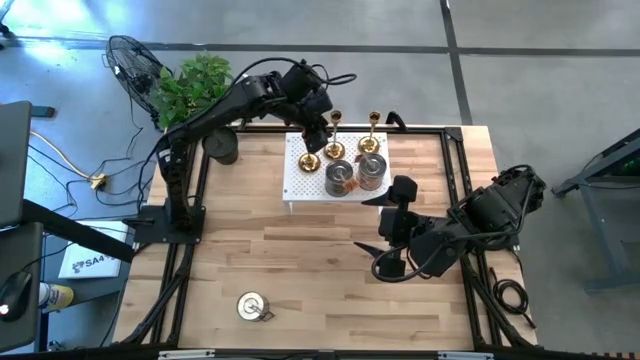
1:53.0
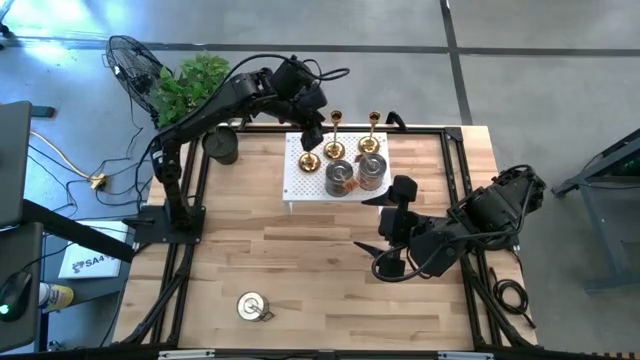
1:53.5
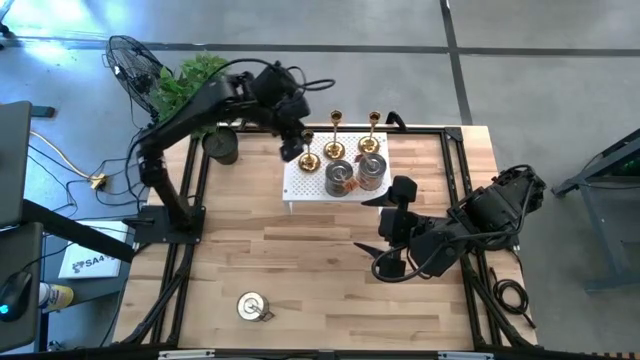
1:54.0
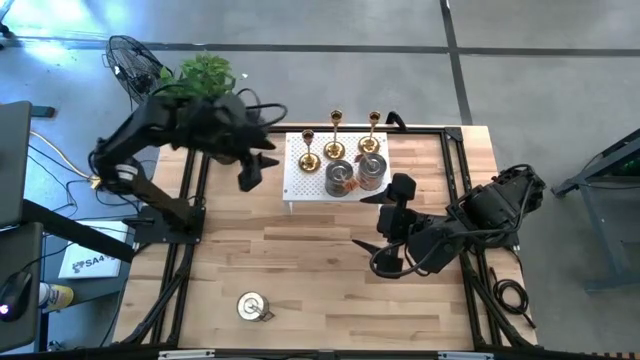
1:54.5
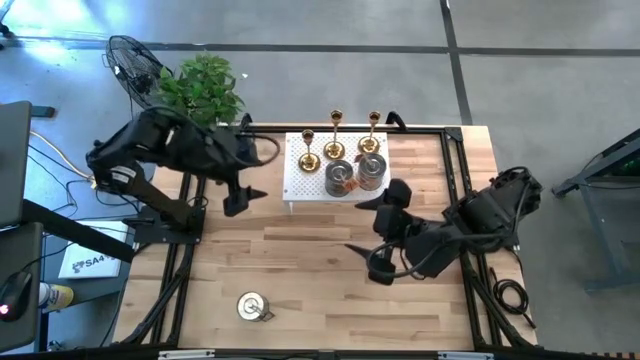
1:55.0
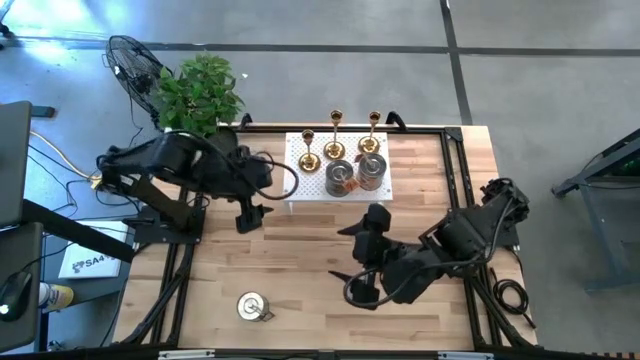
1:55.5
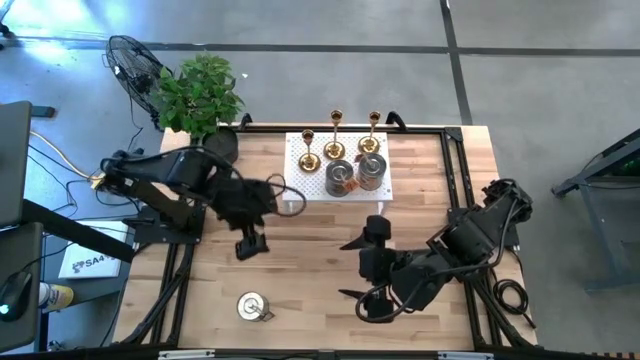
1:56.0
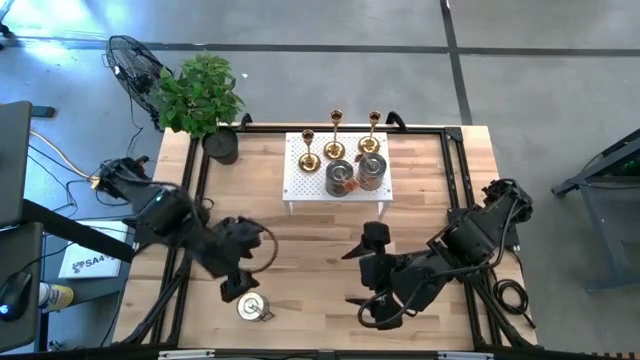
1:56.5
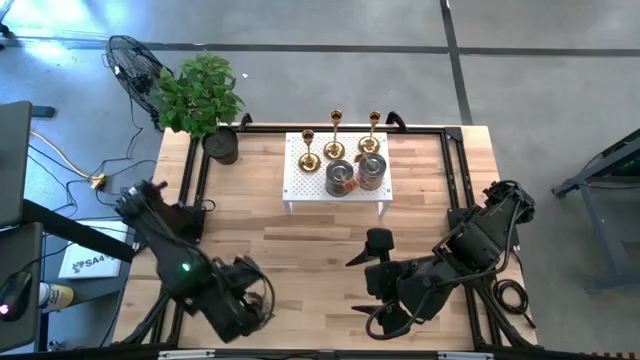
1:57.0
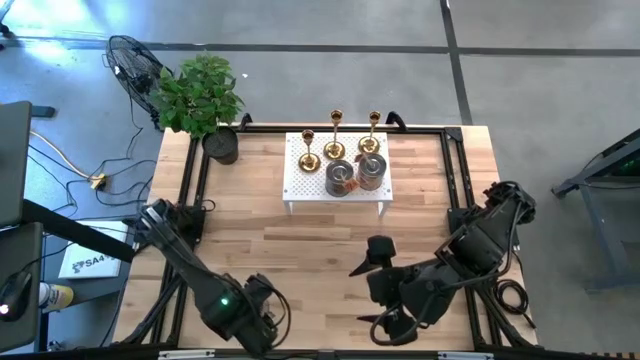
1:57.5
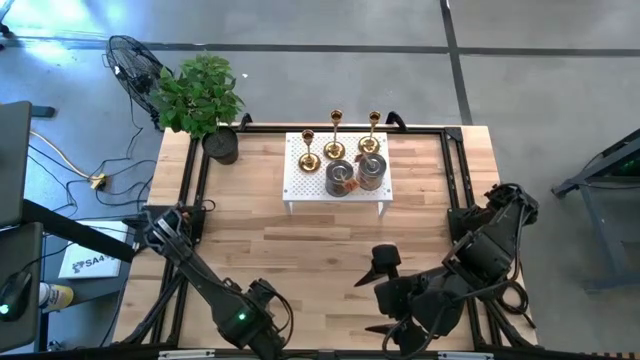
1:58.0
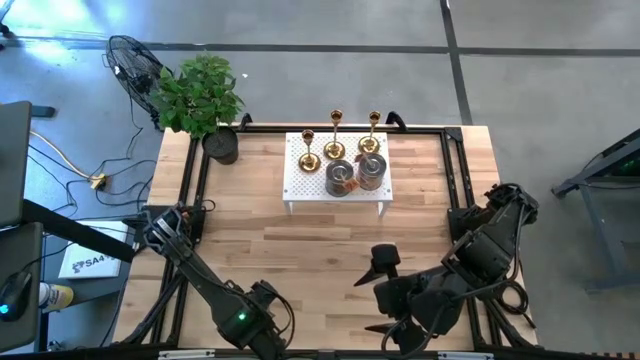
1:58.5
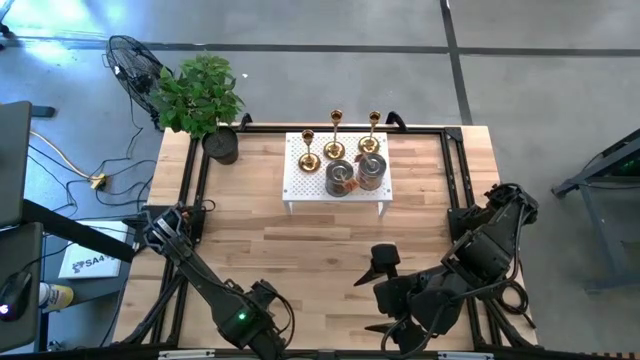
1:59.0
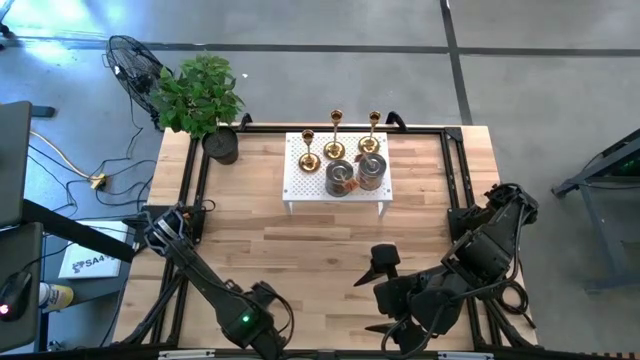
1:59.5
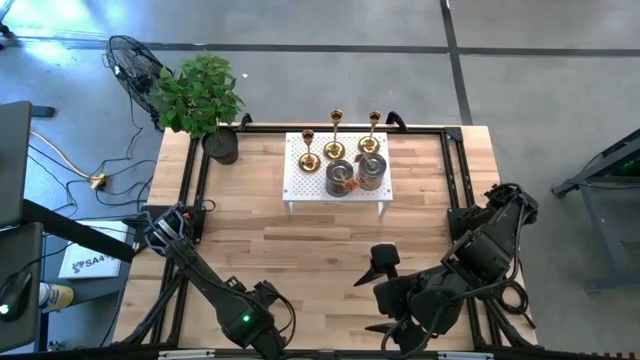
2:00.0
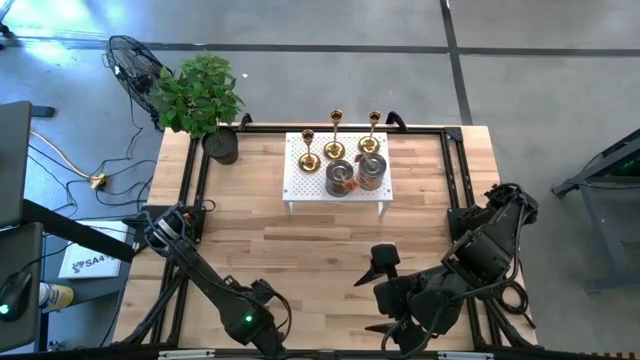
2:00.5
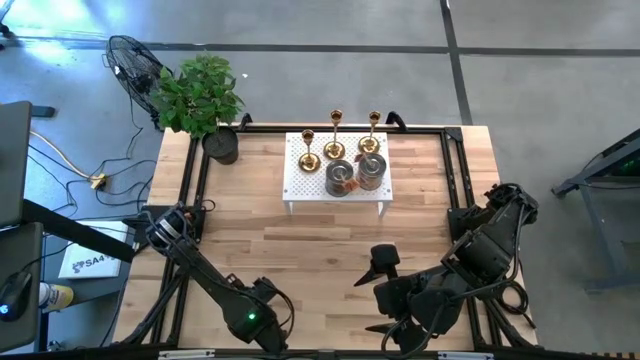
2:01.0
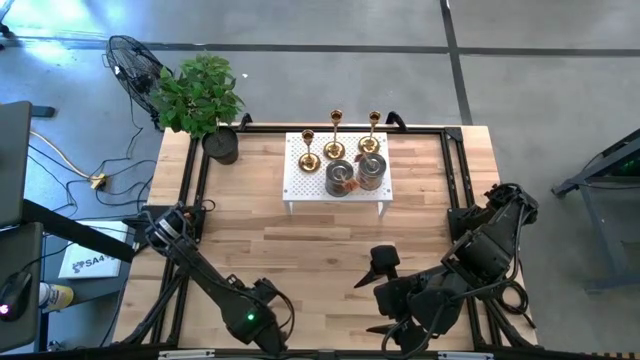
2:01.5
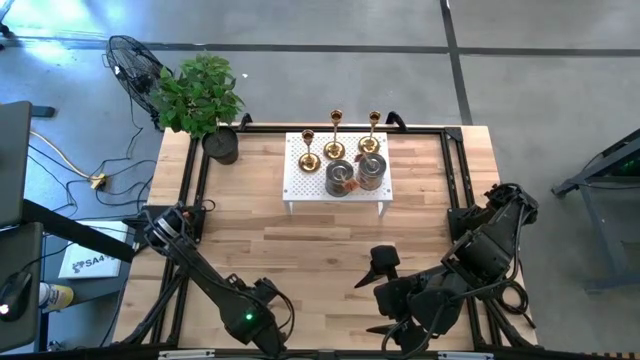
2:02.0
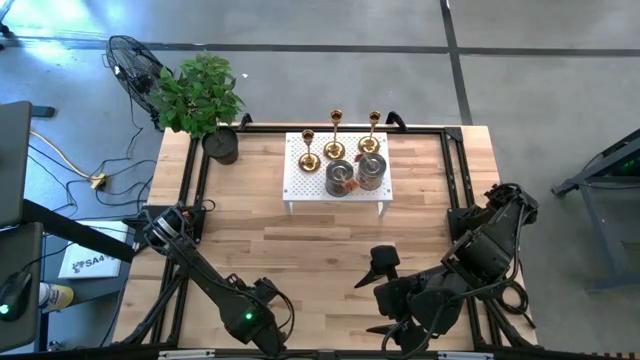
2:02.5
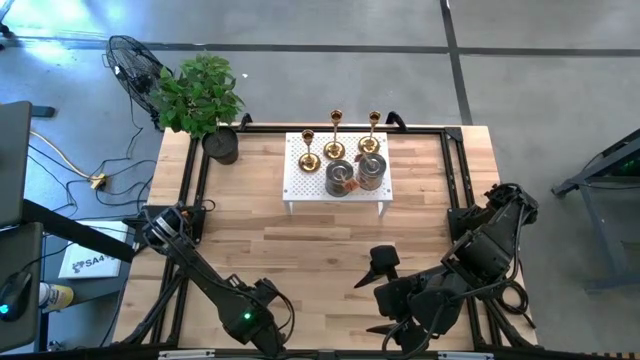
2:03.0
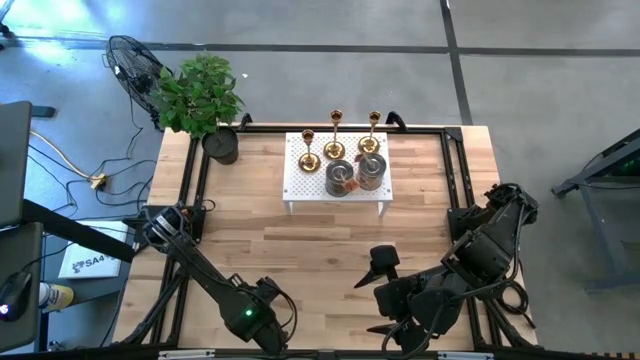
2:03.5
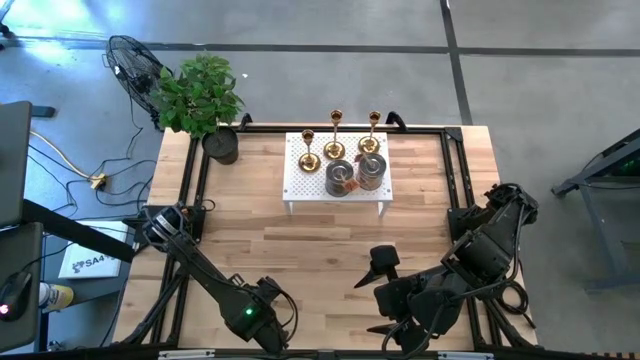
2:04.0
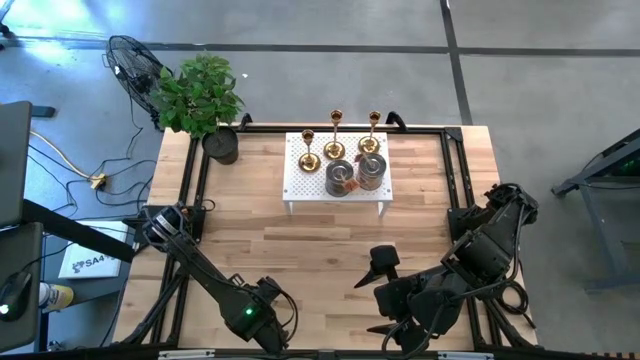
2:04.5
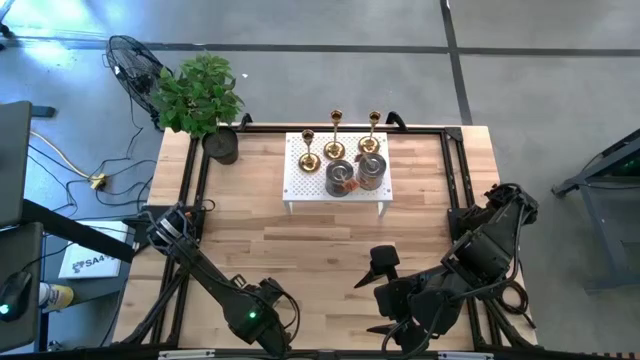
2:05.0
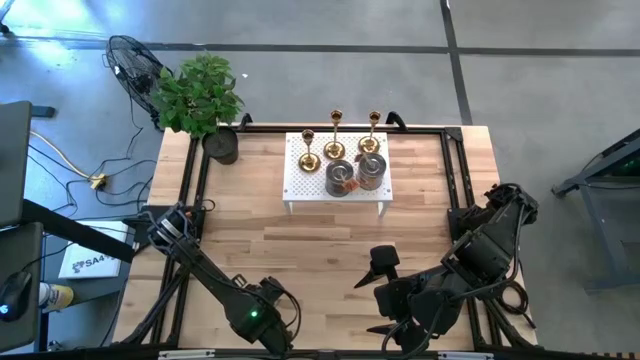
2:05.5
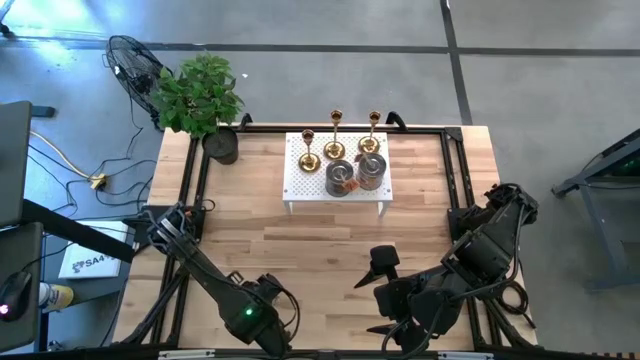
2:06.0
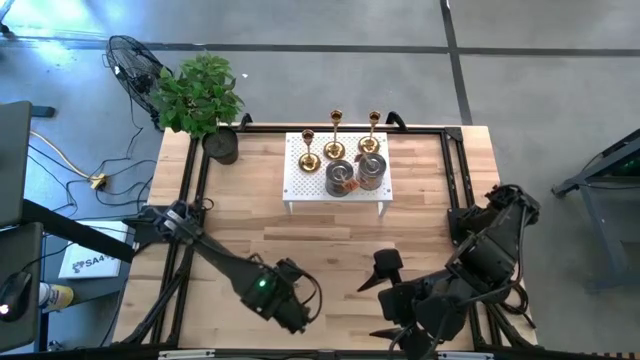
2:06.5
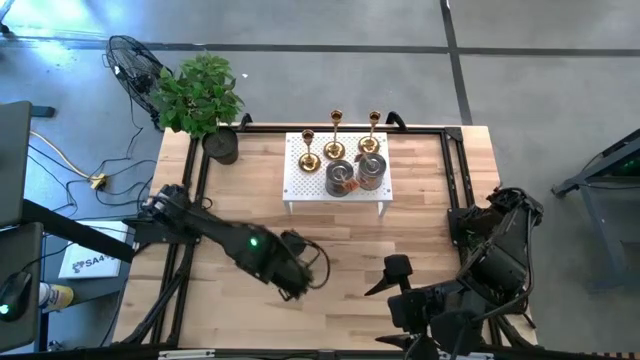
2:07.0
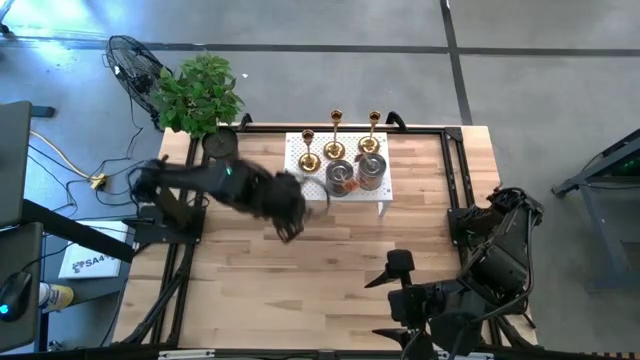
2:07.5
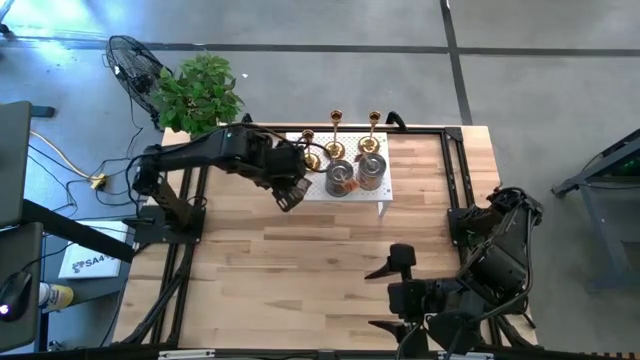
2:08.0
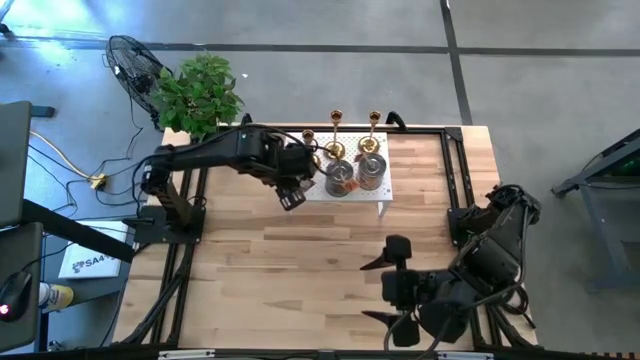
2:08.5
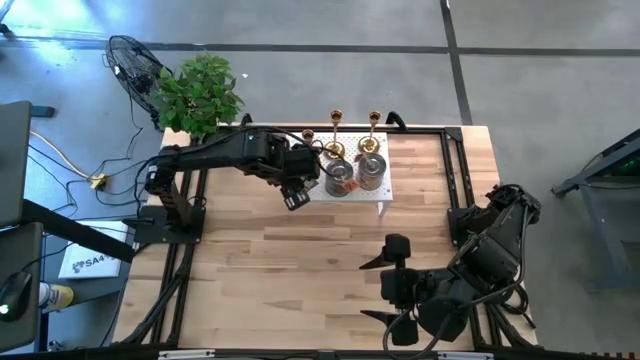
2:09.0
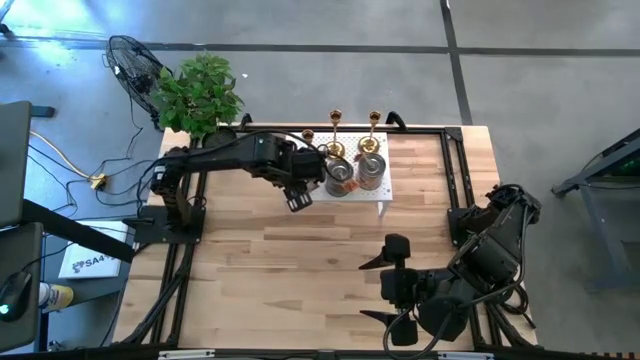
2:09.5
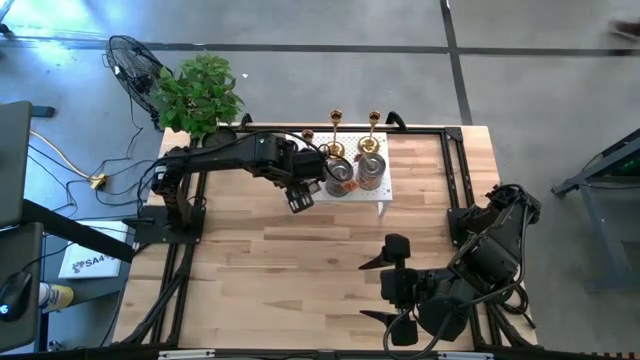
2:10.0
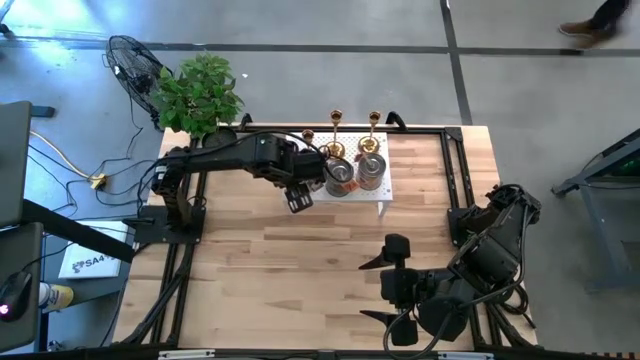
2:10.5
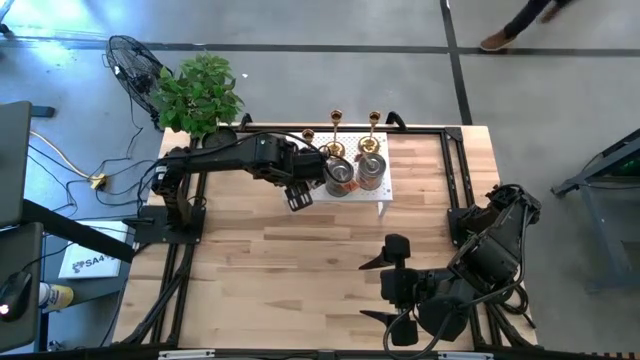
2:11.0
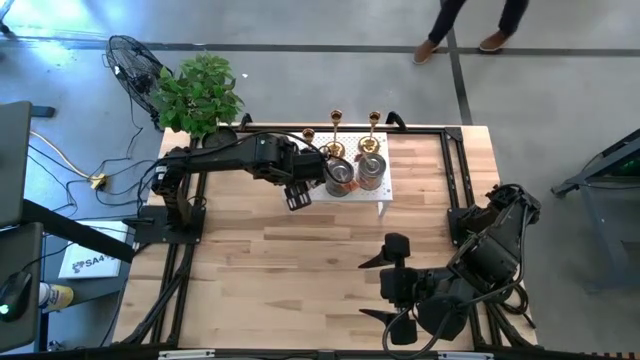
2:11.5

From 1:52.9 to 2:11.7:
Task: Pick & Place candle stick holders
Align the silver scented candle with the other silver scented candles on the shelf

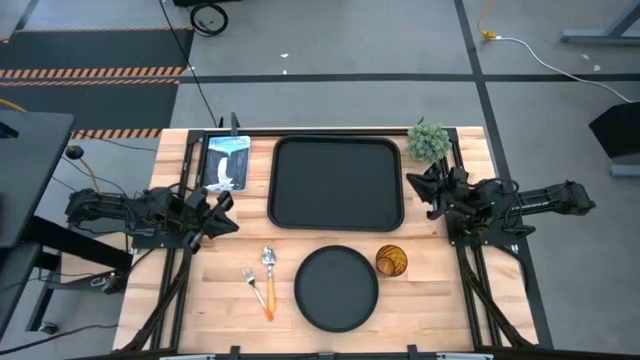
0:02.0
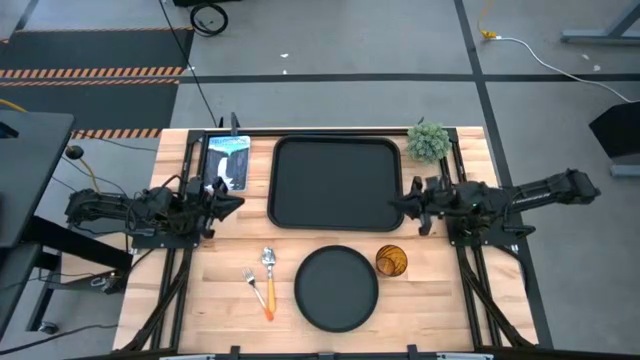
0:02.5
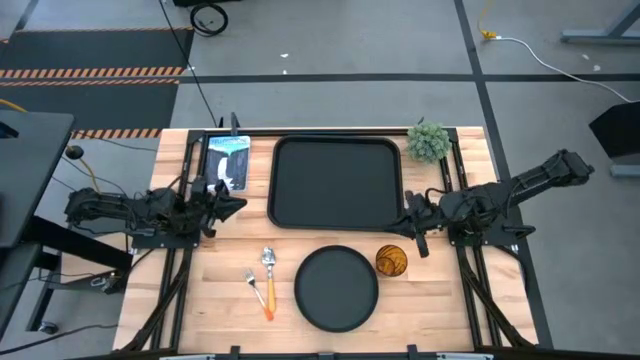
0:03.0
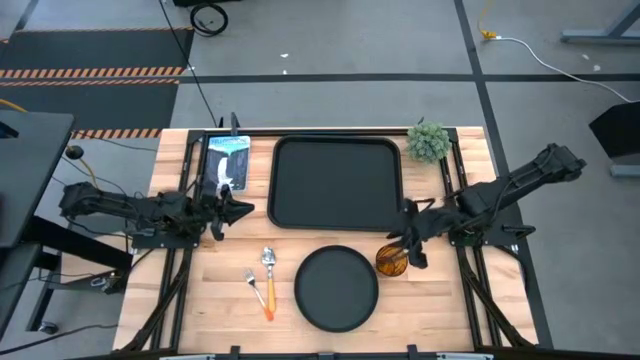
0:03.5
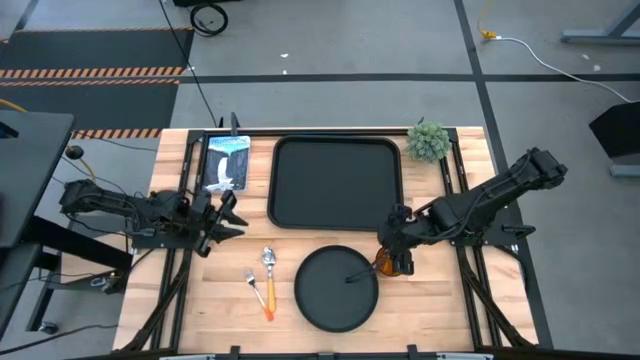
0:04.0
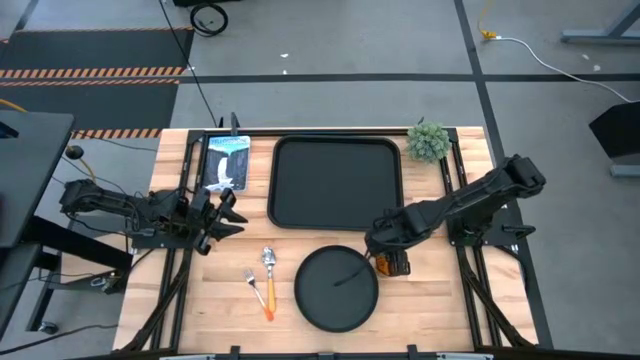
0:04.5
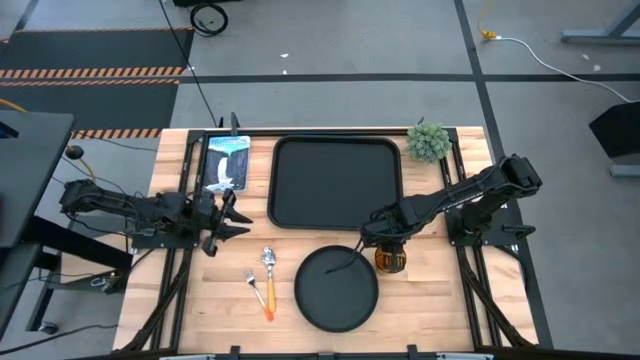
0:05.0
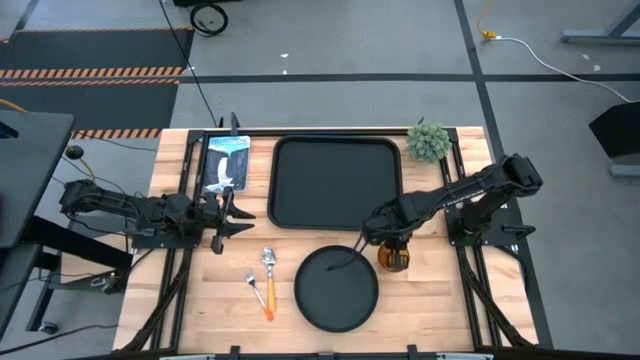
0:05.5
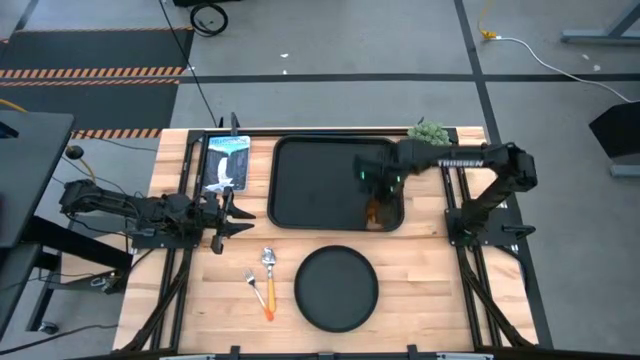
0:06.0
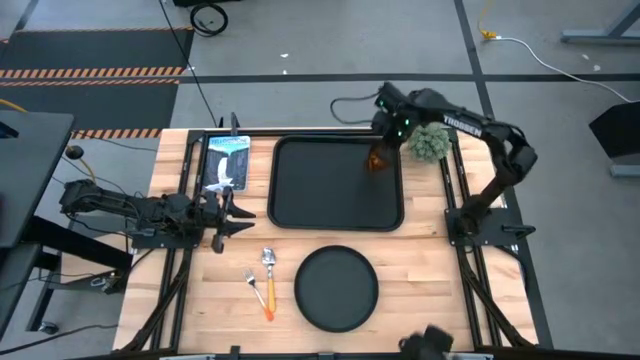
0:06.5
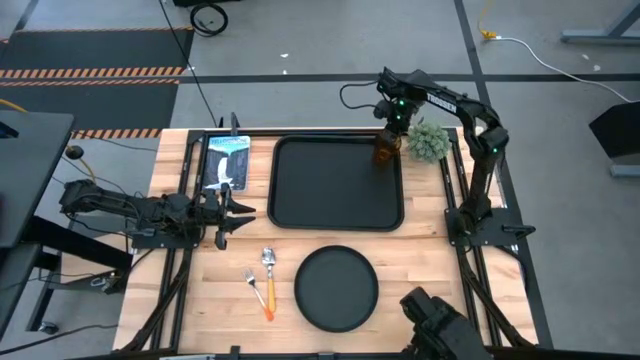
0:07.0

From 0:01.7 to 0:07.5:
Task: Pick and place plate/cup/fork/spoon on tray
Put the brown cup on the black tray
